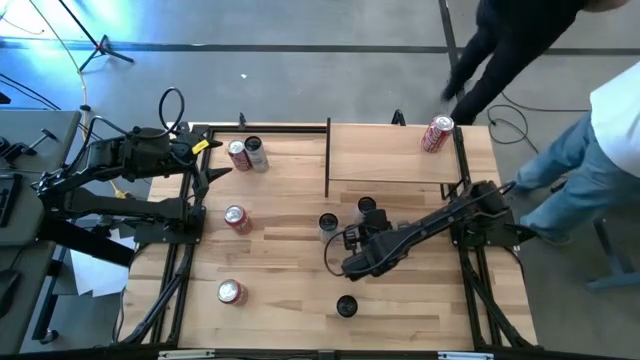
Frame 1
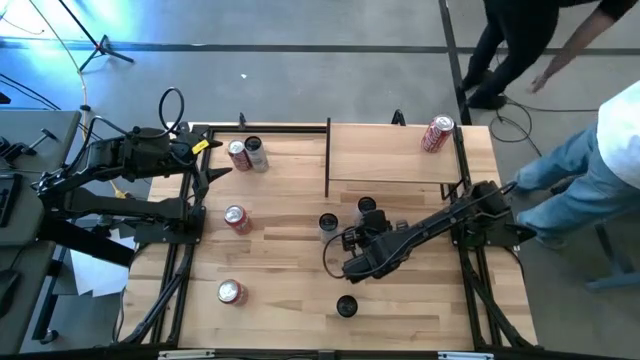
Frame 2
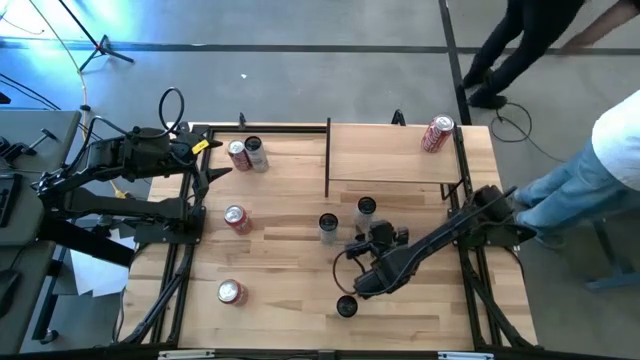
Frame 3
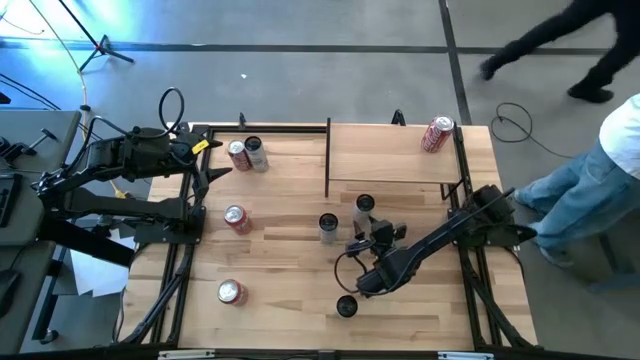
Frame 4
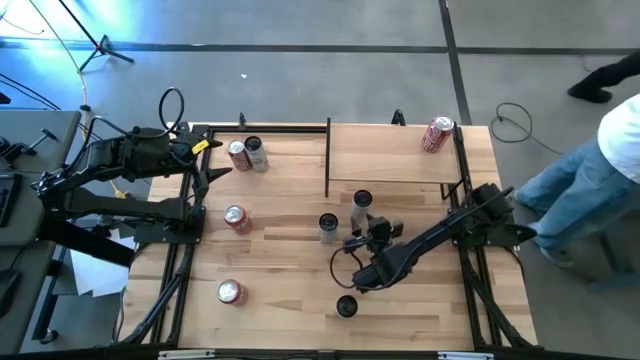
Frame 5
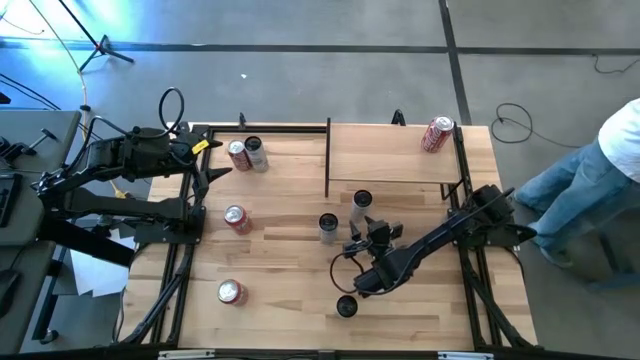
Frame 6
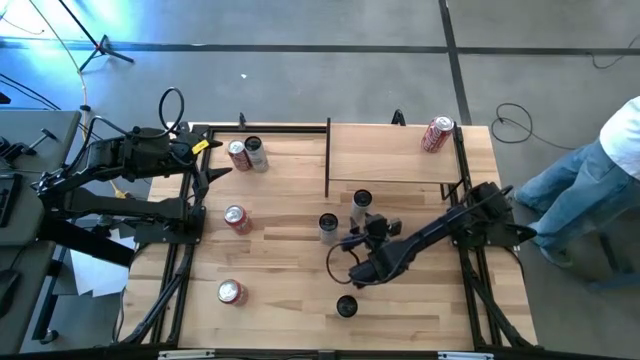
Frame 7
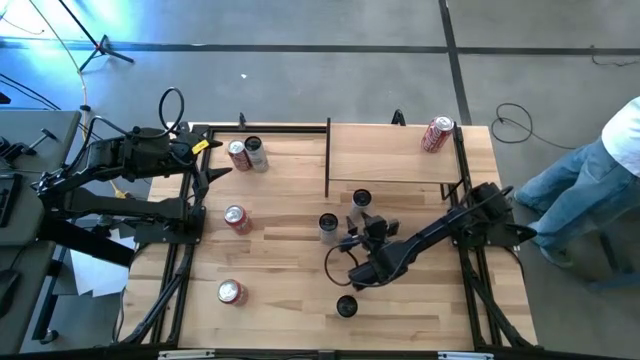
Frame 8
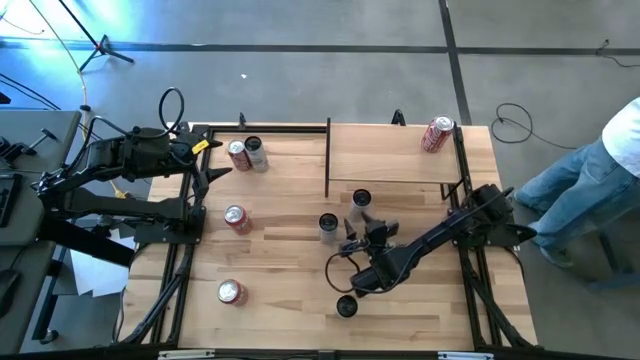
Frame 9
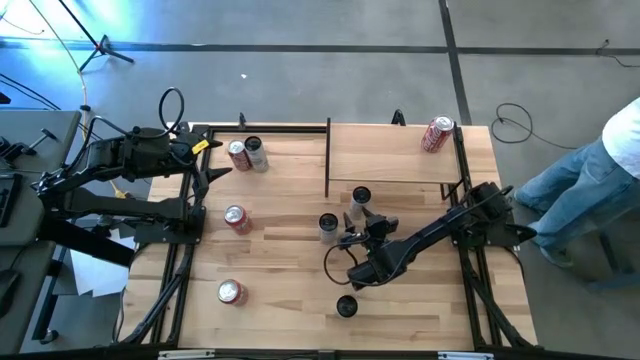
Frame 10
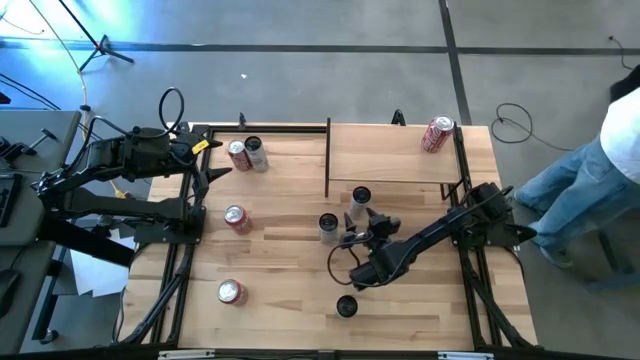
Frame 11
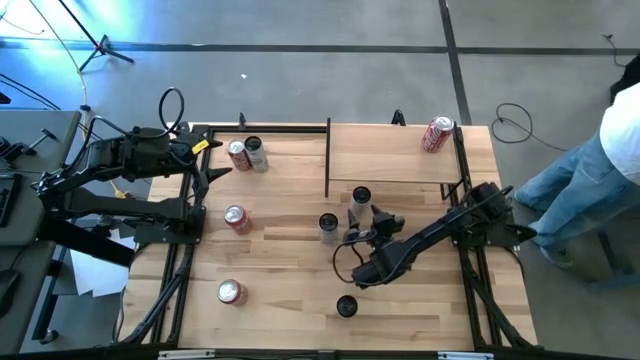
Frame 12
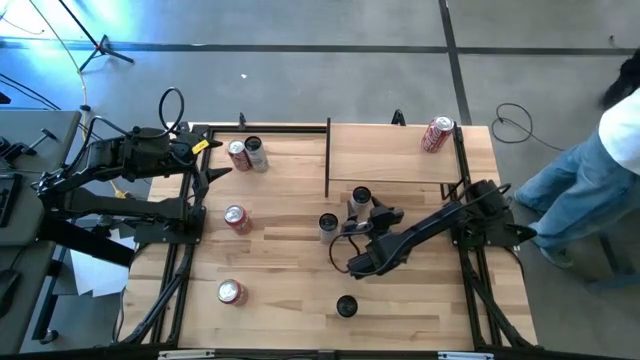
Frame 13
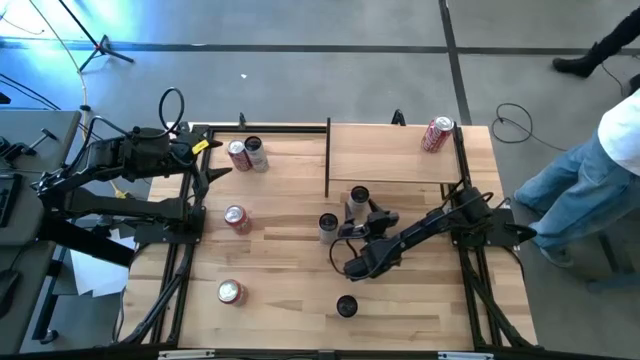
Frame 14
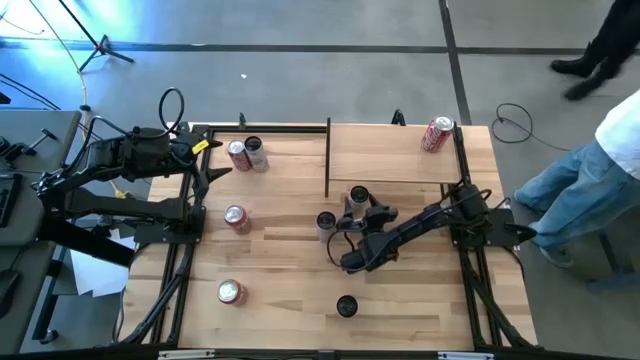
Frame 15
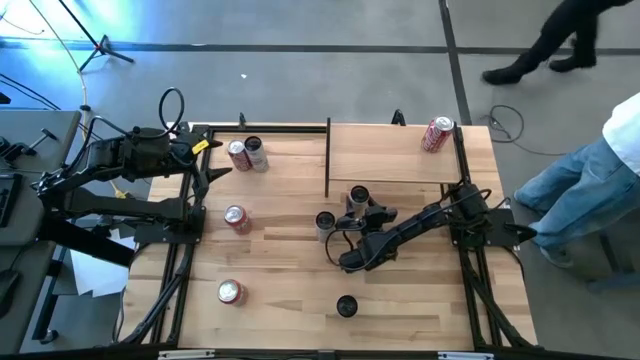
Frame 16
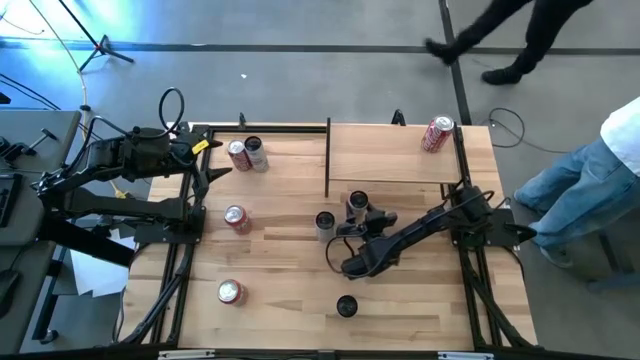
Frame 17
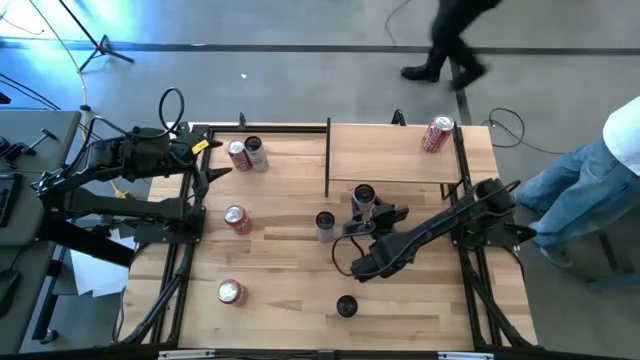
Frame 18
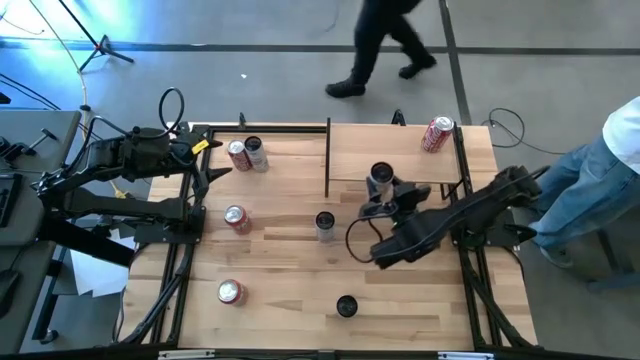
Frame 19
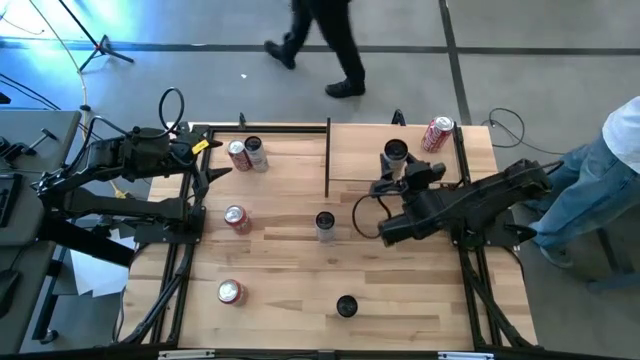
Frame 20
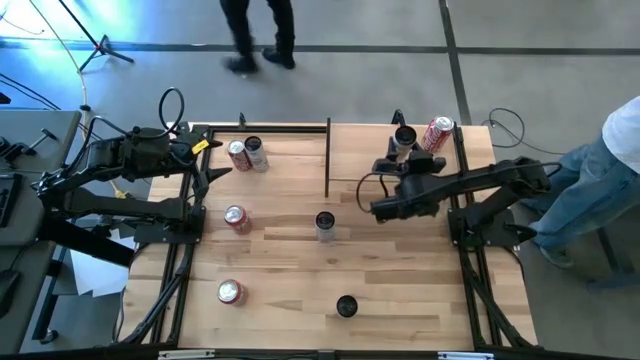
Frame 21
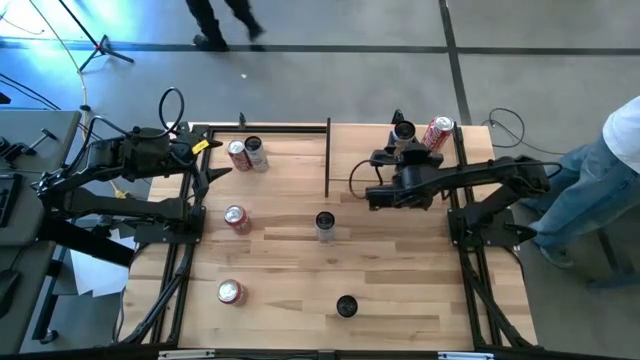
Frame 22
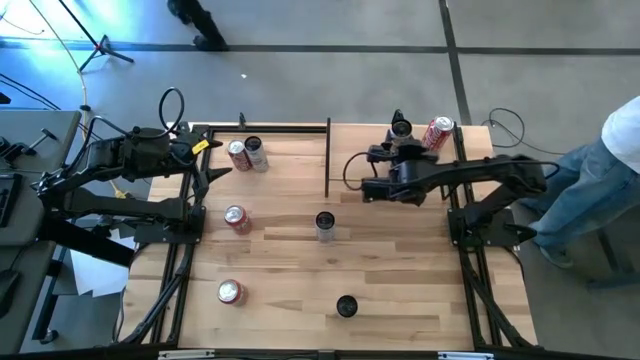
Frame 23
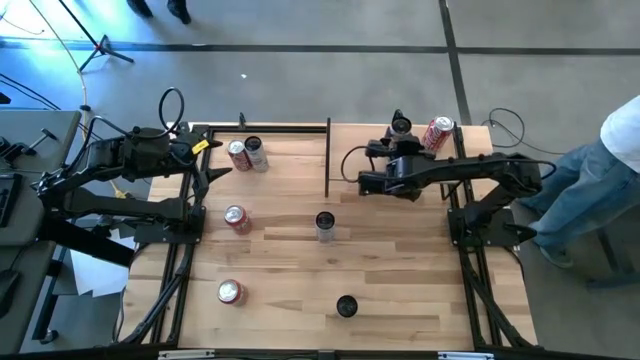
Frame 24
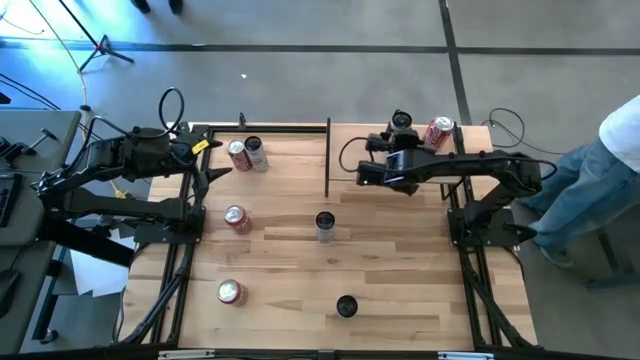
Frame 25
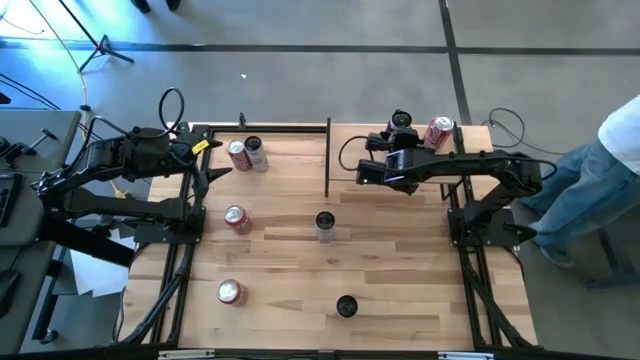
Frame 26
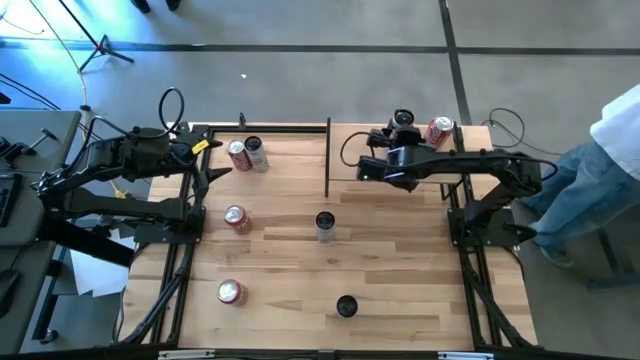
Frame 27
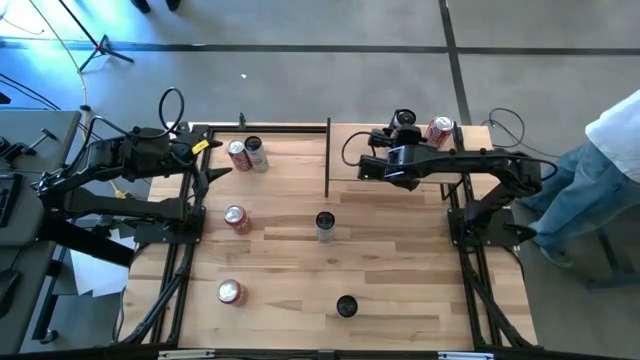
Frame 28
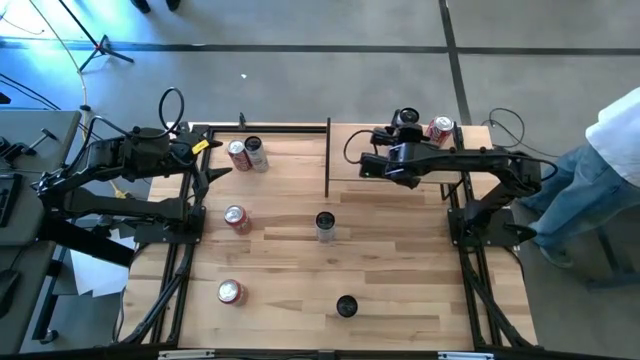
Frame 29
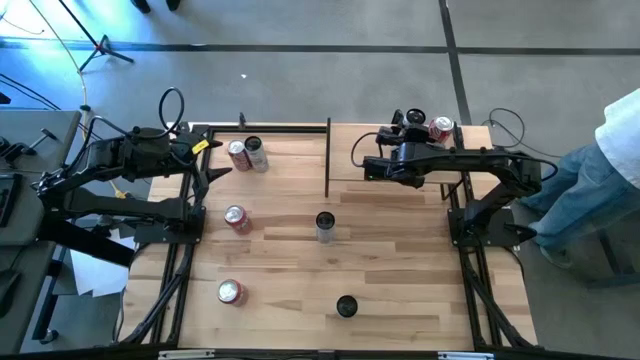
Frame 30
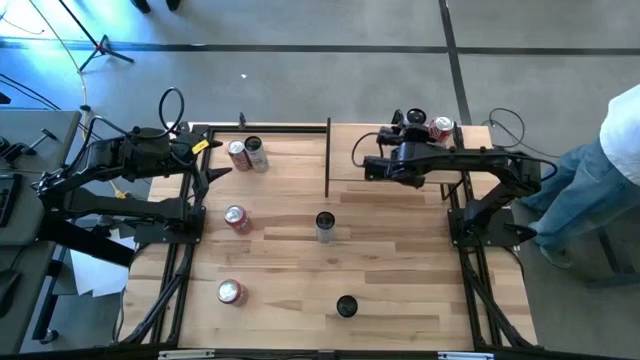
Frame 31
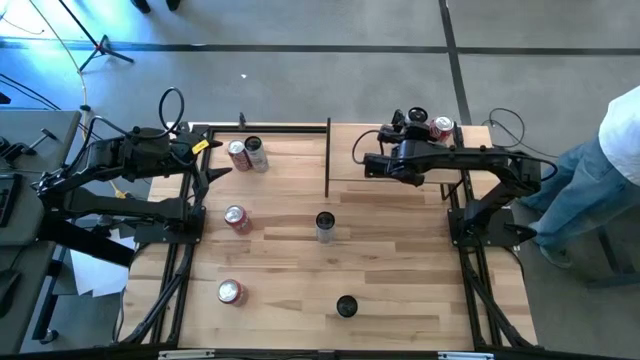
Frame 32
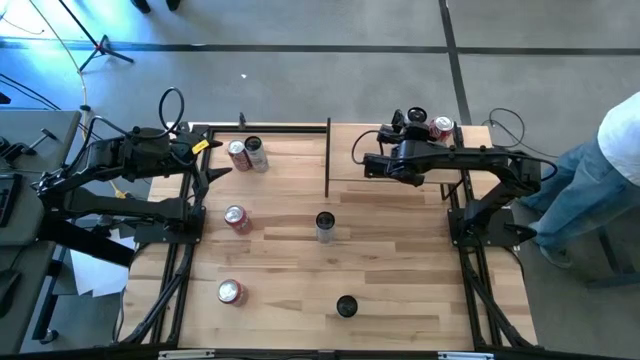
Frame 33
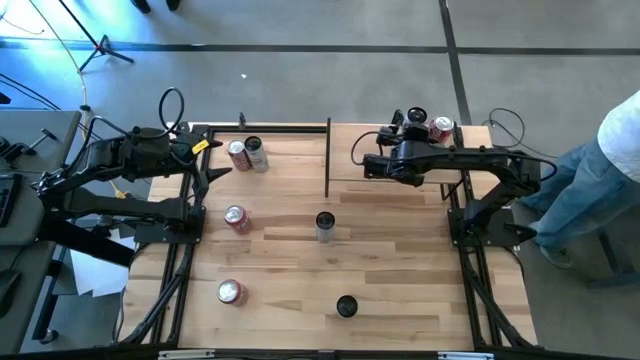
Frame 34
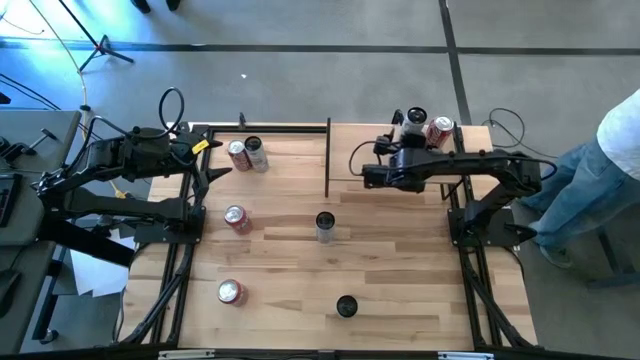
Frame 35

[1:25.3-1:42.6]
Task: Place canned beverage on shelf
Put the white soda can on the shelf

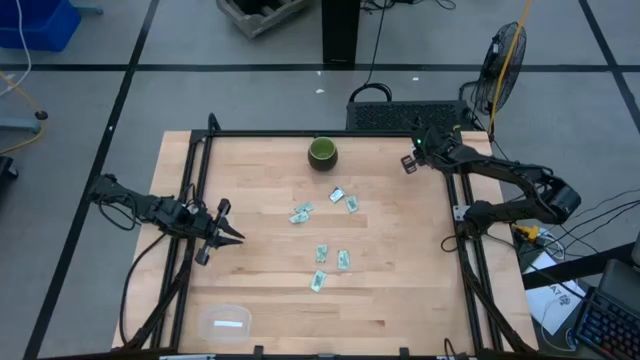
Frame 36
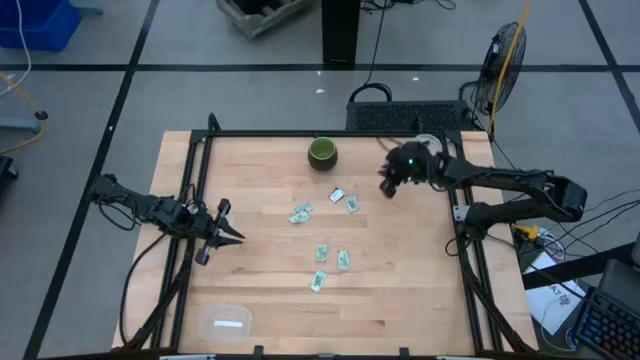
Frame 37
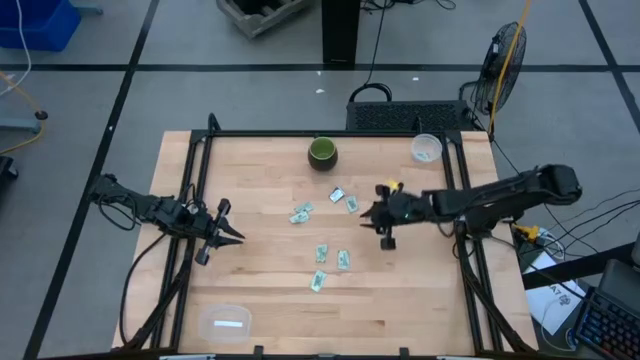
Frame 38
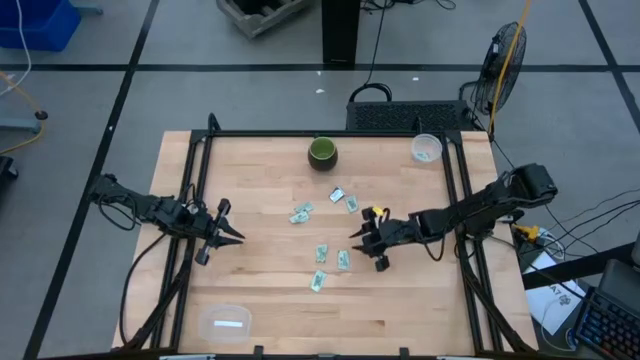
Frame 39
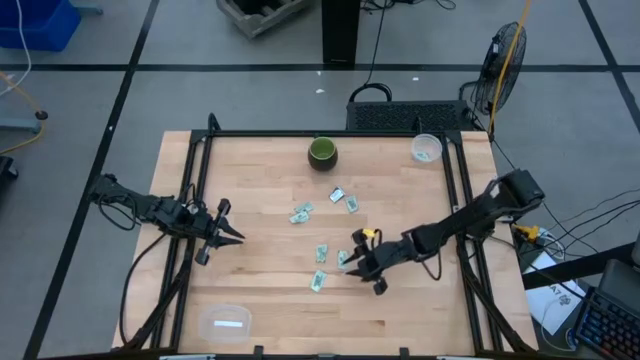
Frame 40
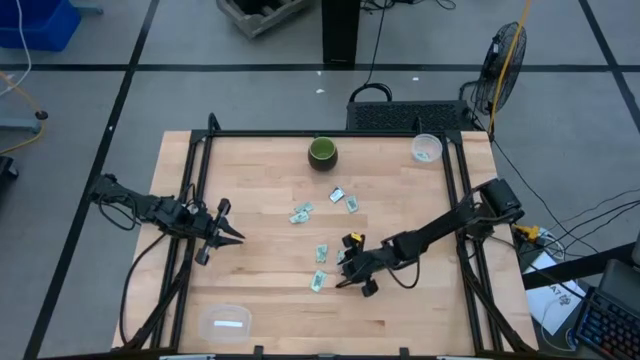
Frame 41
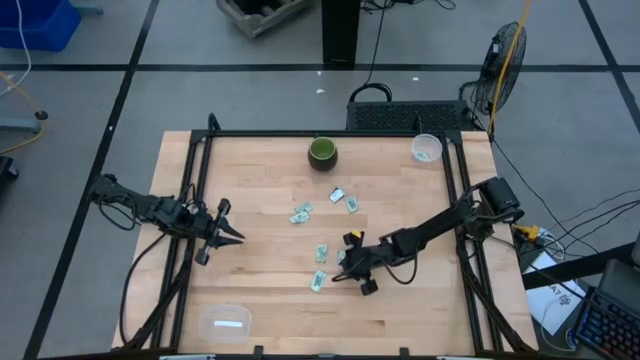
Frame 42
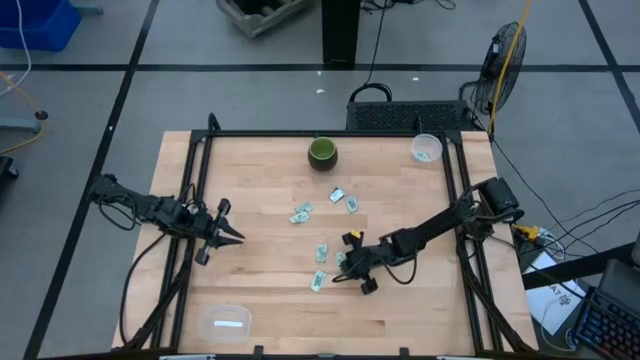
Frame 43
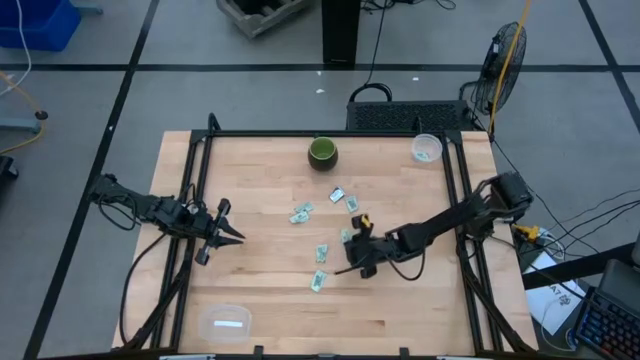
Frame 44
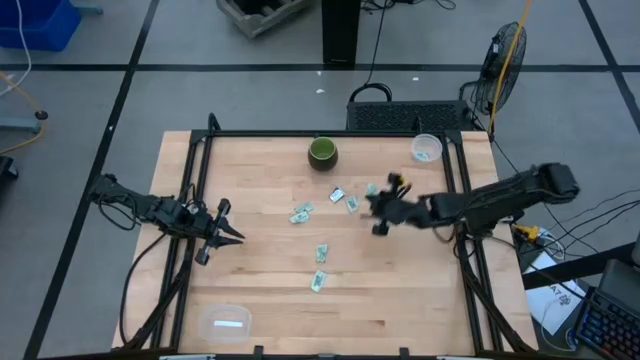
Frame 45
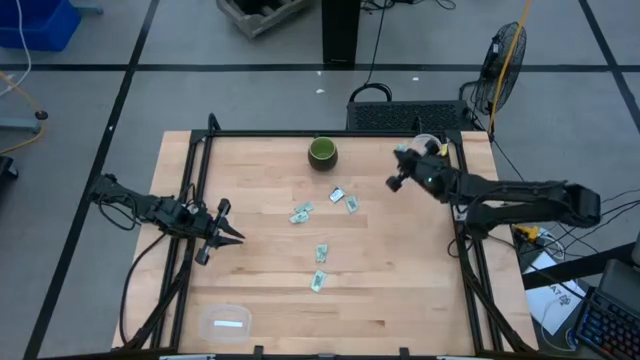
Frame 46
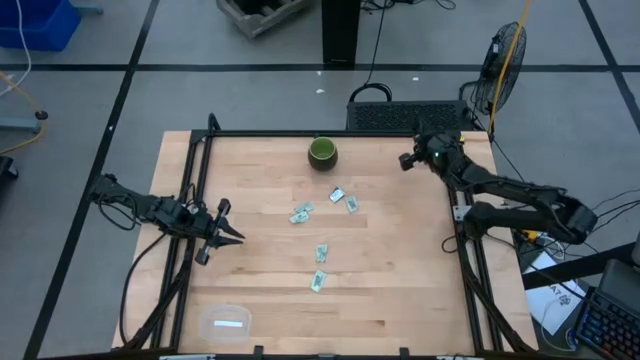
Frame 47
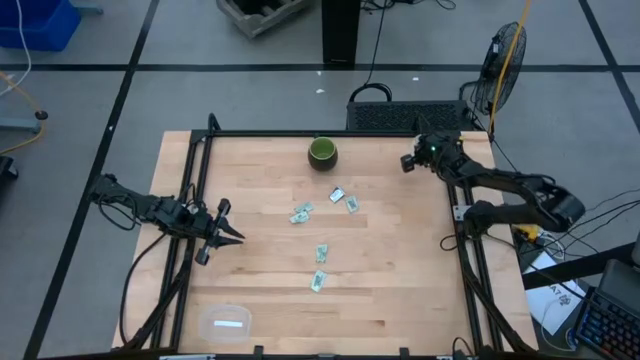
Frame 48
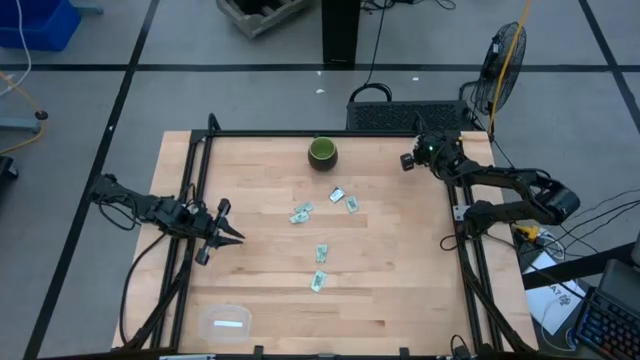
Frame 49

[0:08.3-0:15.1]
Task: Pick and place items into bin
Put the stevia packet into the top transparent bin
